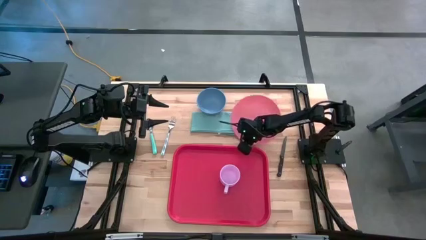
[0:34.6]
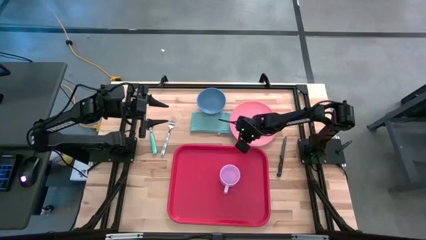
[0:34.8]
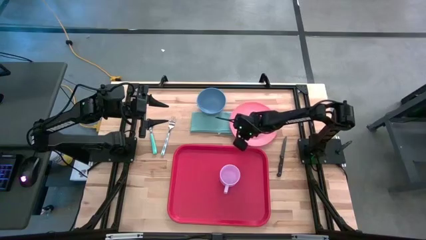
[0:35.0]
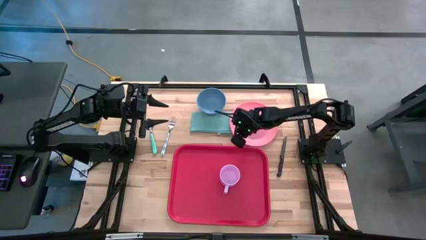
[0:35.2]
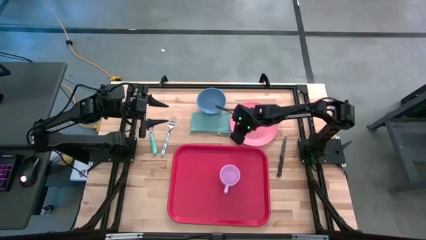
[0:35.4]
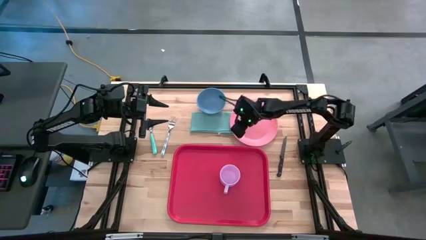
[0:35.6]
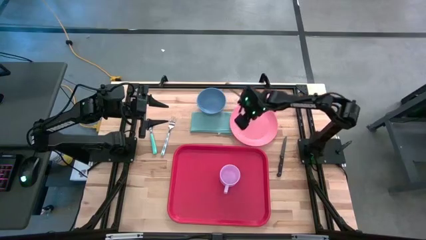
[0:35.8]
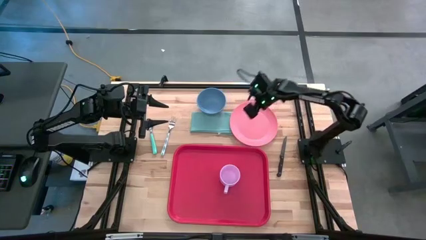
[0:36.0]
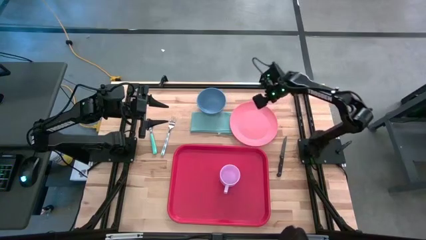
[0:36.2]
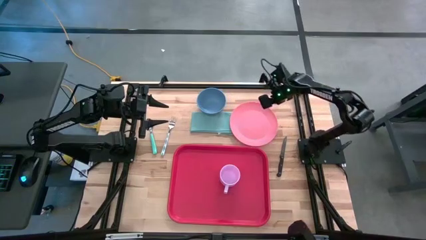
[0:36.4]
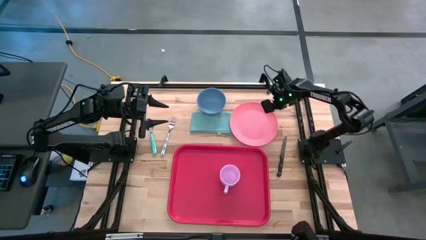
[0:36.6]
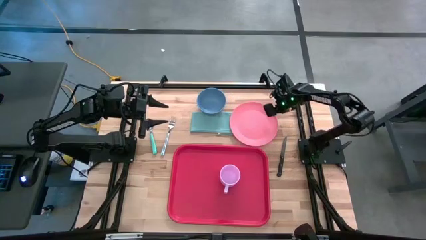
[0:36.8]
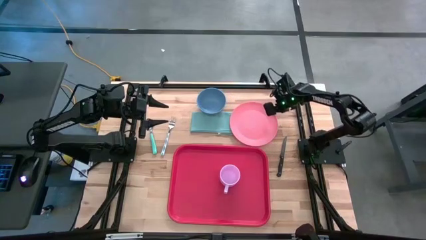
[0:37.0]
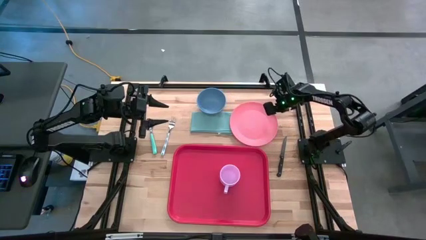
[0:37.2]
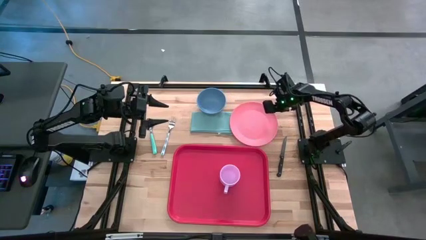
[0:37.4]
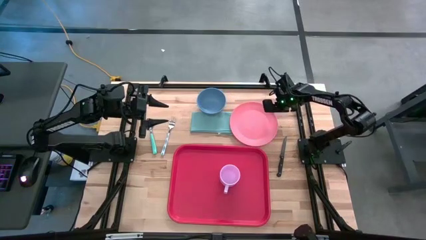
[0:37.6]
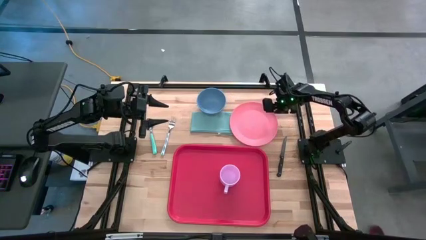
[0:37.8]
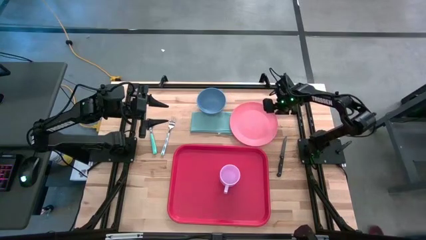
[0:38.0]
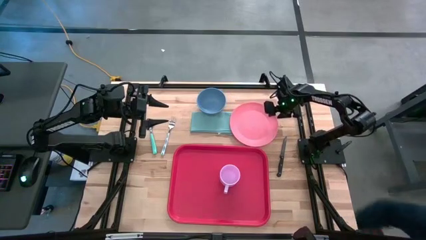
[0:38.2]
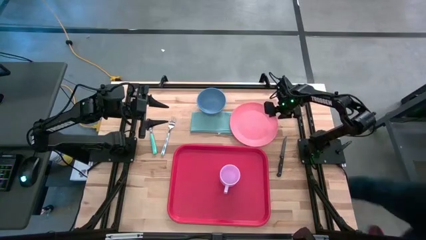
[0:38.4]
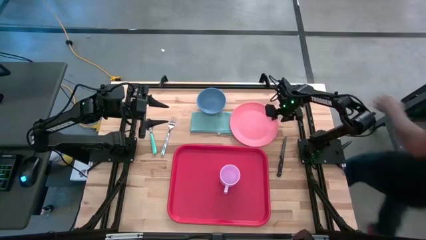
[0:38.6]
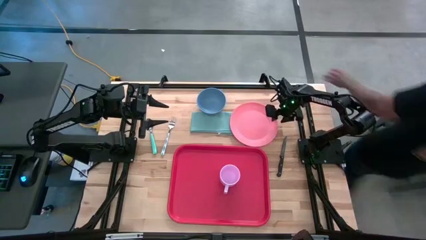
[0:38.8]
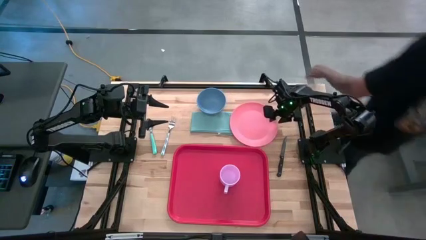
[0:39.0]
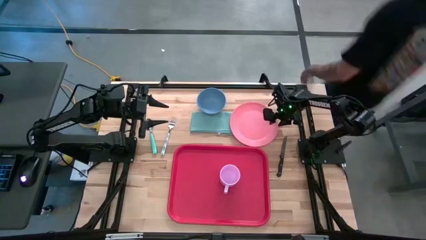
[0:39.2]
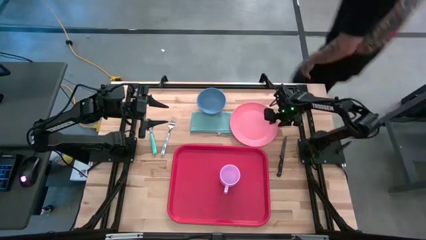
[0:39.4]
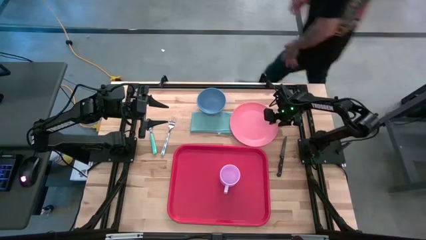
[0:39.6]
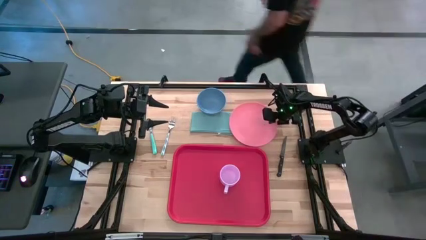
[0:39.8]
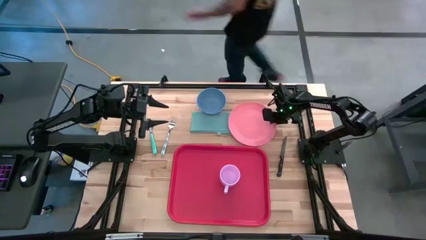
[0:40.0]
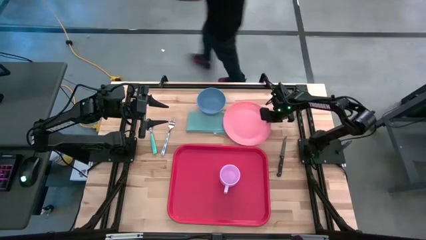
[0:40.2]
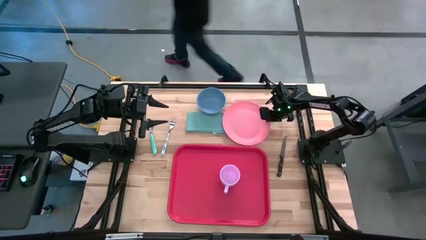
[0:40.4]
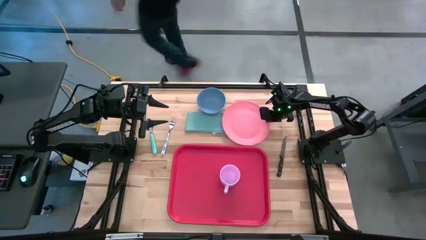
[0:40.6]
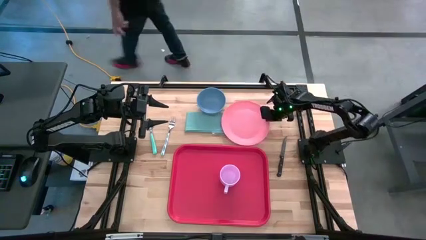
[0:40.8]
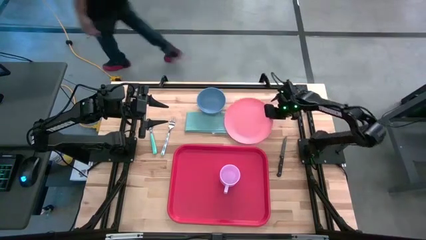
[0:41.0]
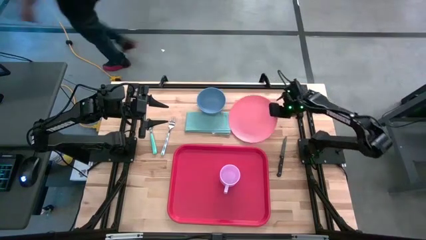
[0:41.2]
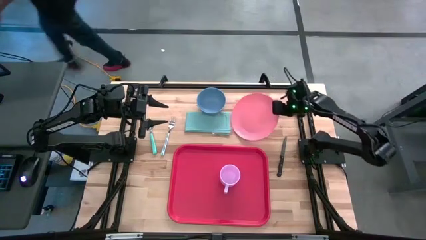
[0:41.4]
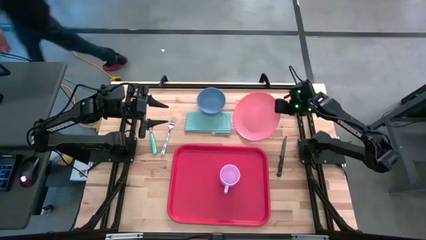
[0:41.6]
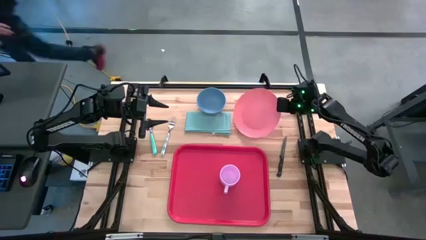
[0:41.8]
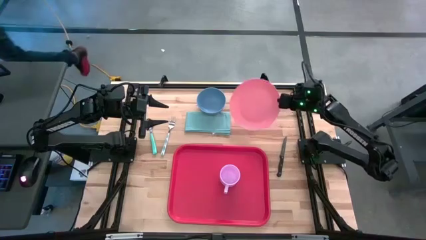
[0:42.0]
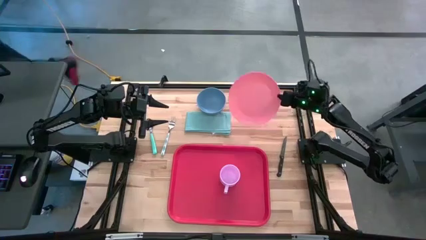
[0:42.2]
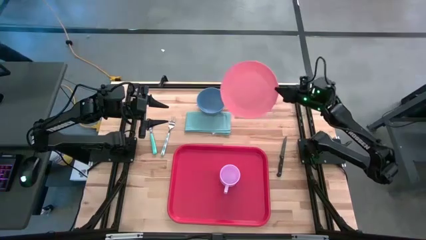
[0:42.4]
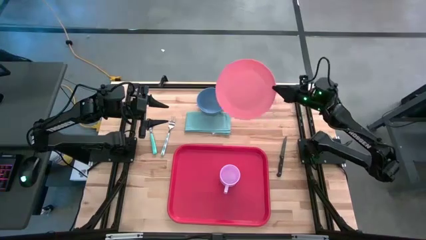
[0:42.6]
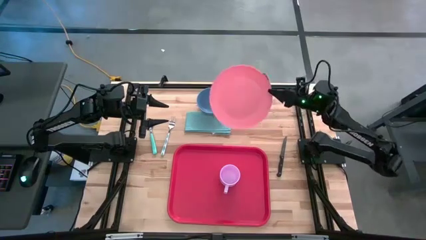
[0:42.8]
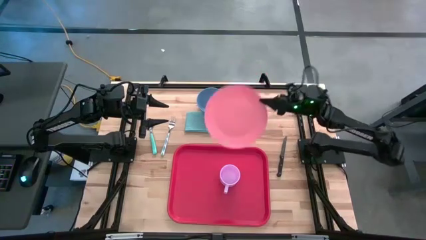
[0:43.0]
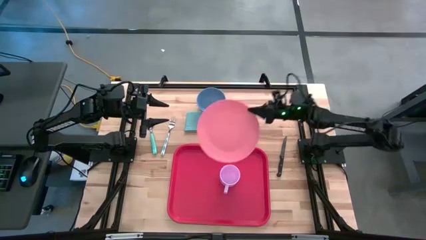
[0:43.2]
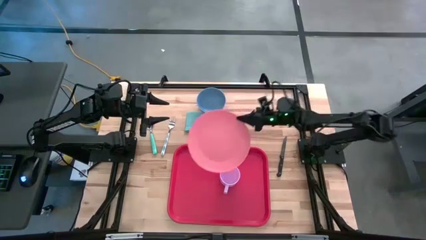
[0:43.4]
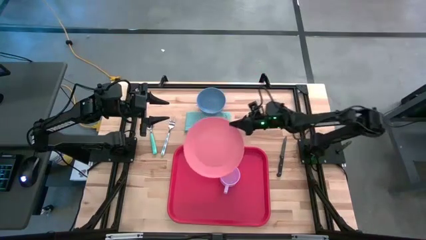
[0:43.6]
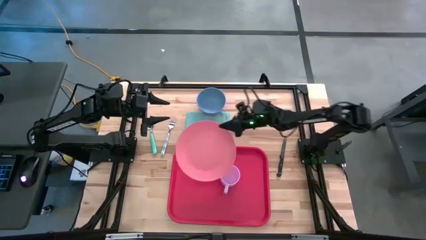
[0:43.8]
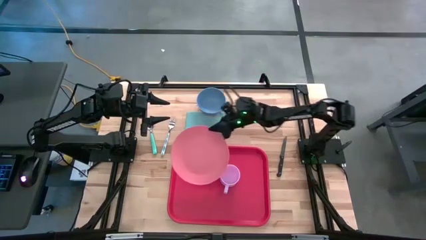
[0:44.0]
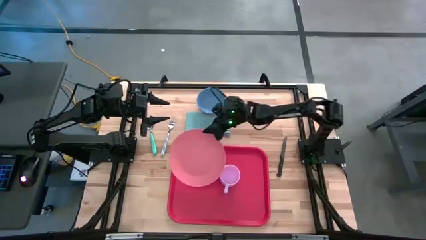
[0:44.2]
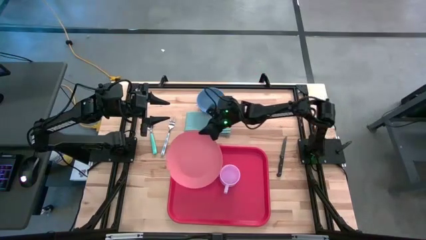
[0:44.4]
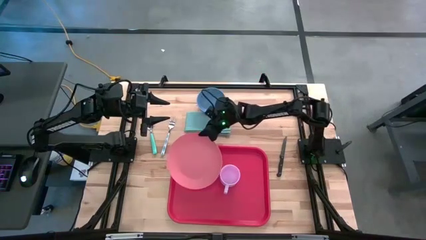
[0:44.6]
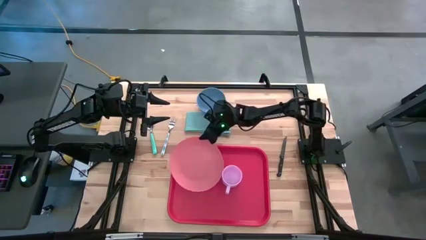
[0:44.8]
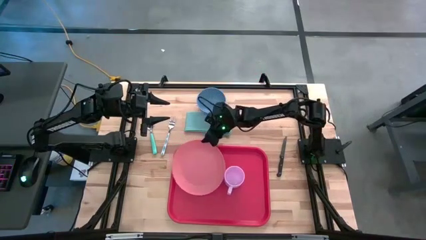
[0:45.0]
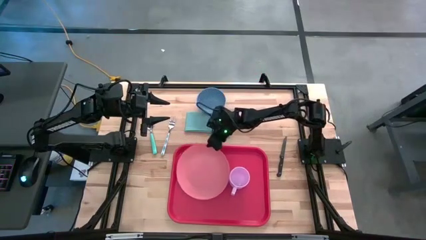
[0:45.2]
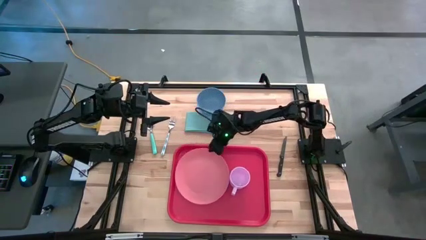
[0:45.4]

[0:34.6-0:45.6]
Task: Set up tray
Put the pink plate on the tray to the left of the purple mug

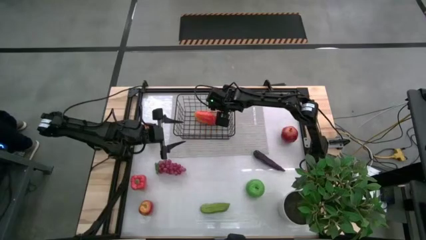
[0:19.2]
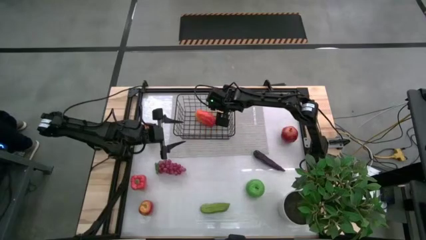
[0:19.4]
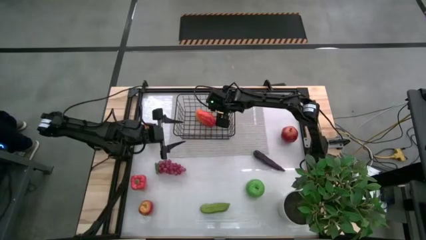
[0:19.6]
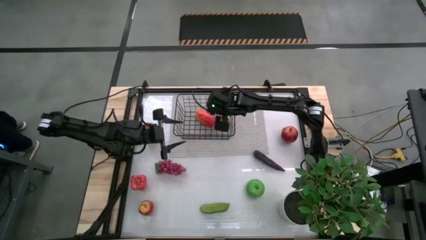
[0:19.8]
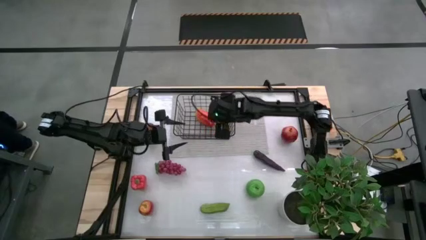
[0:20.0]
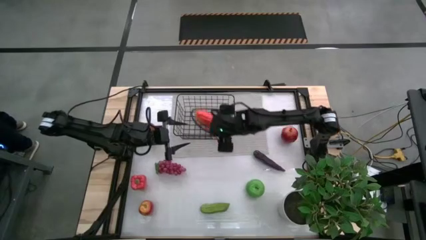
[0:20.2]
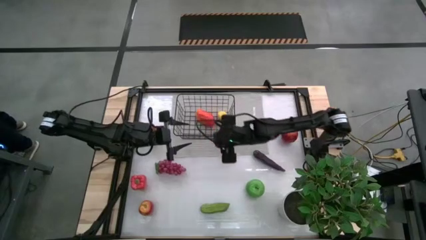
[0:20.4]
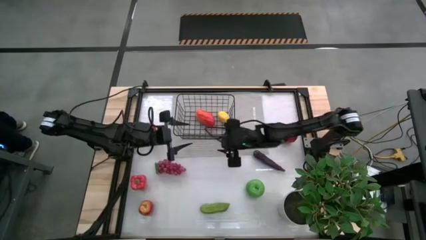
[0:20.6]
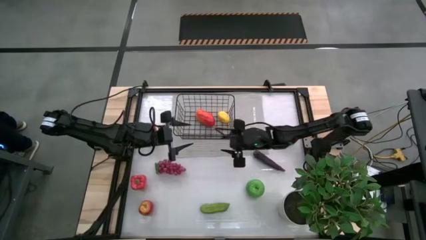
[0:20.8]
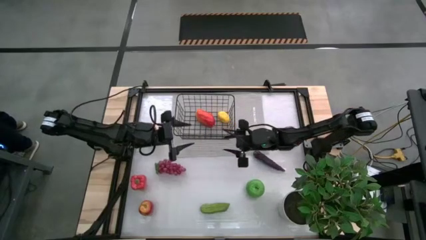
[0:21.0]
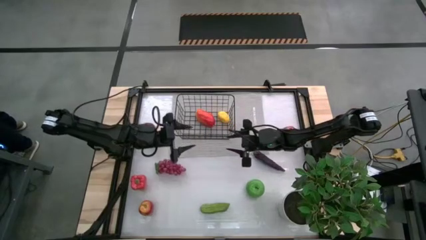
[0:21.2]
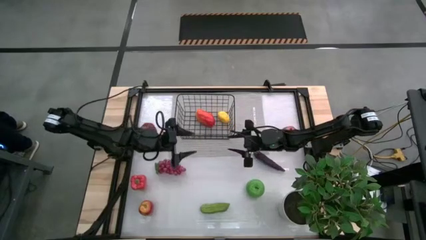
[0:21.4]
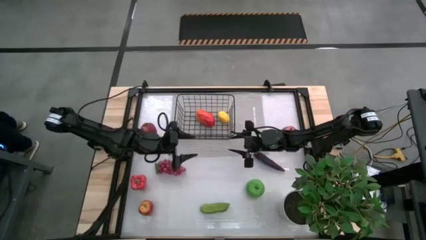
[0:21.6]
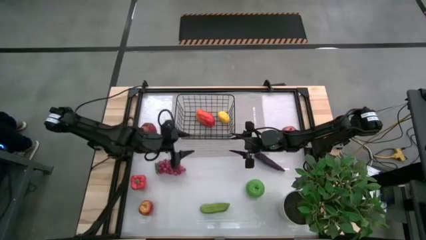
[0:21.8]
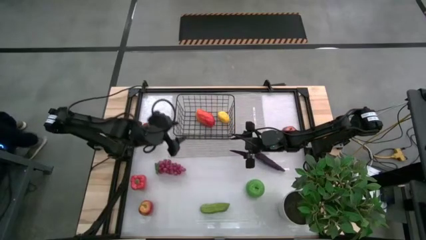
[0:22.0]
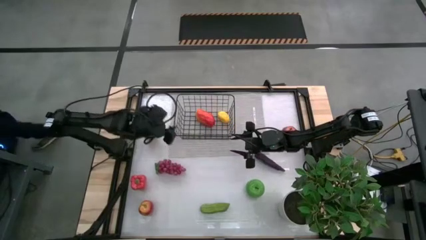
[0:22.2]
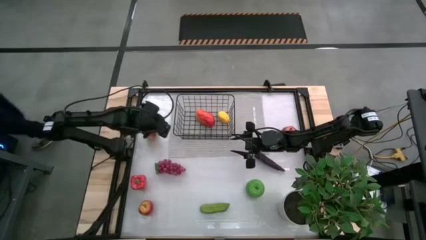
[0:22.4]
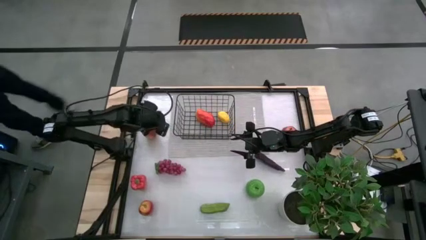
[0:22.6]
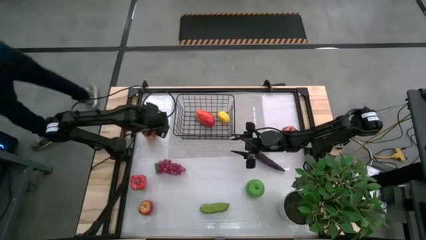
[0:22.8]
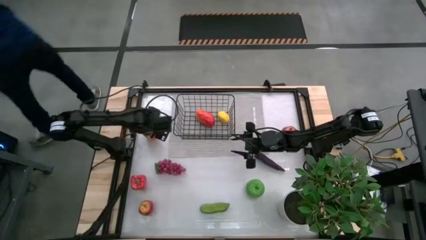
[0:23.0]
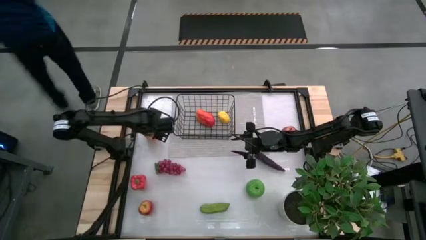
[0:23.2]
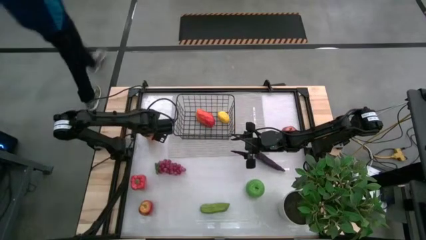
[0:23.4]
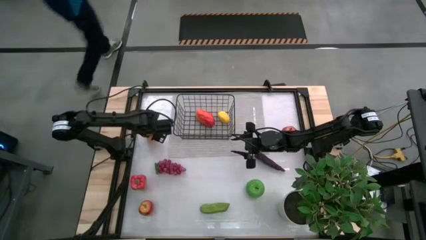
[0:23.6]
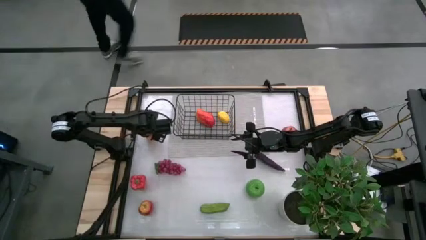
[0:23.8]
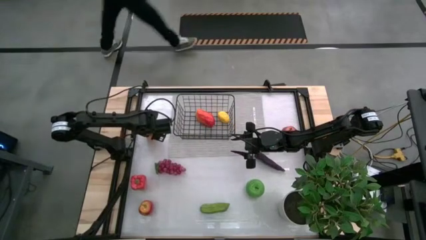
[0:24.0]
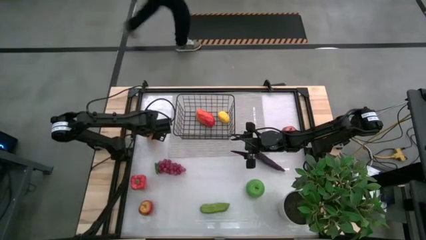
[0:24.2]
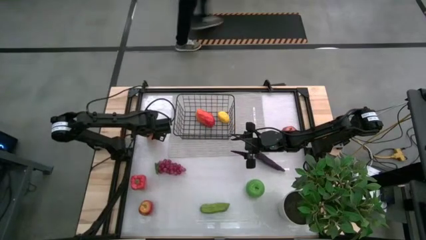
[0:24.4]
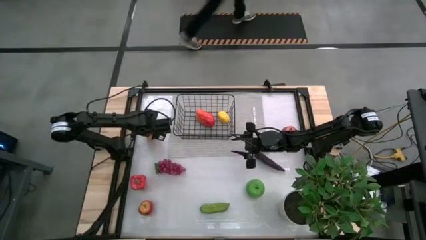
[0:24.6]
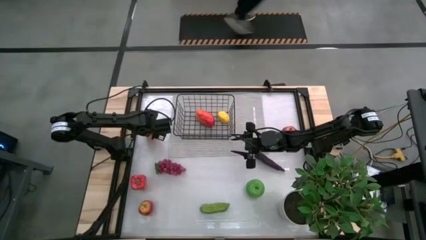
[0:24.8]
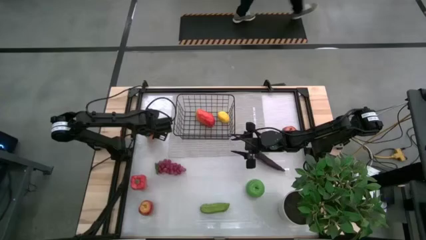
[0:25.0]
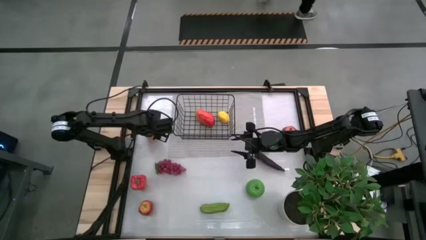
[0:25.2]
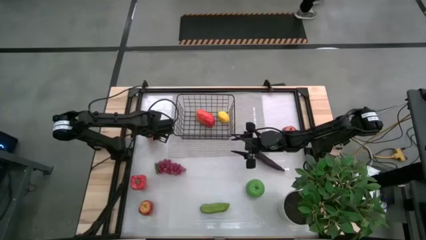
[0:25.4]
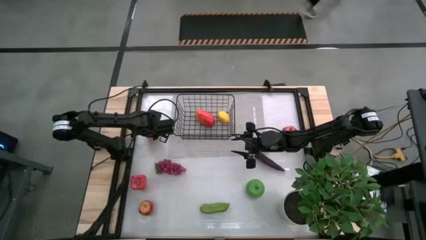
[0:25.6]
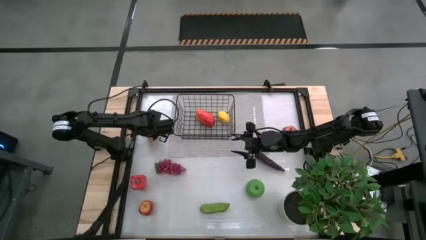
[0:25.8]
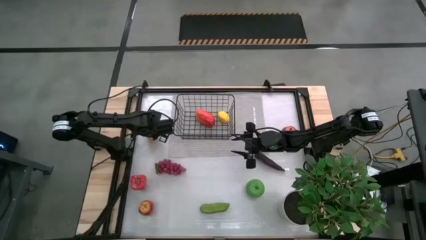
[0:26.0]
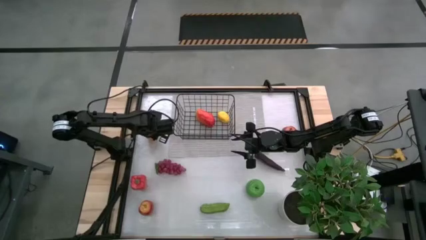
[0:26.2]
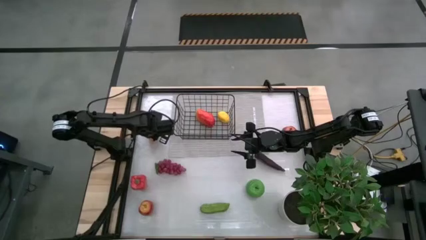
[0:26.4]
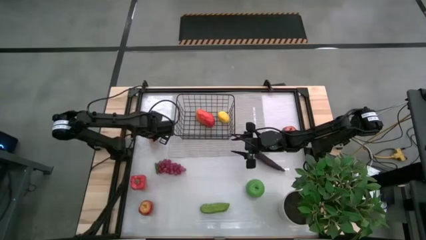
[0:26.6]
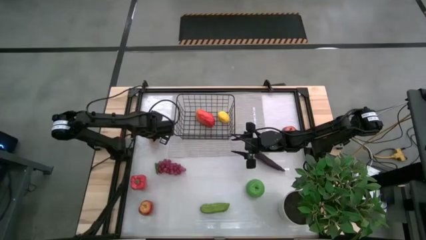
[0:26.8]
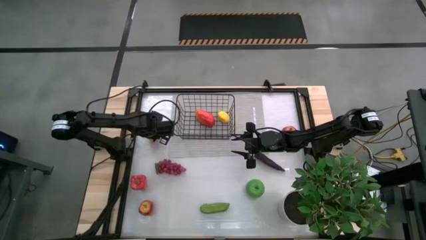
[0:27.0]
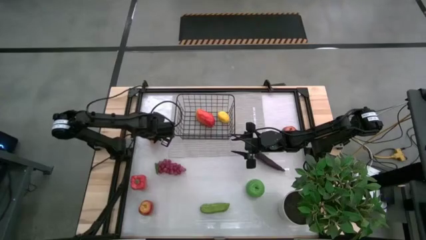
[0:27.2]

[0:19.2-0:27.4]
Task: Build produce basket
Put the dark red apple into the wire basket
